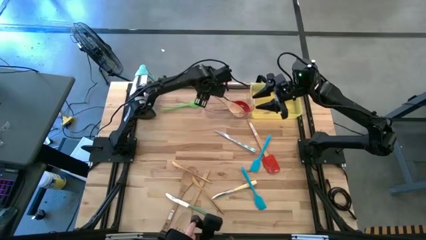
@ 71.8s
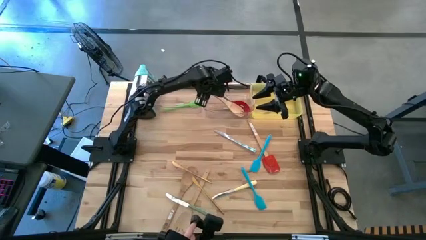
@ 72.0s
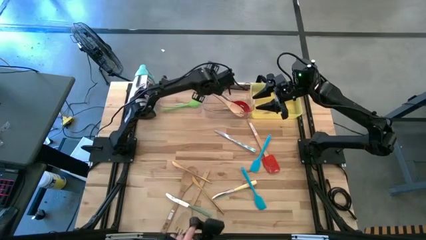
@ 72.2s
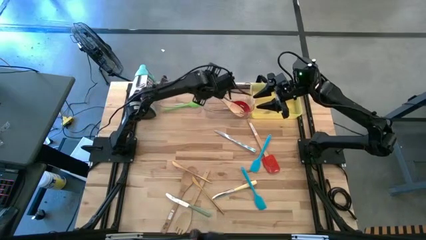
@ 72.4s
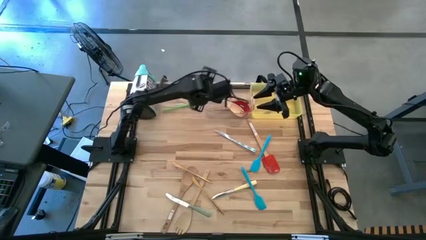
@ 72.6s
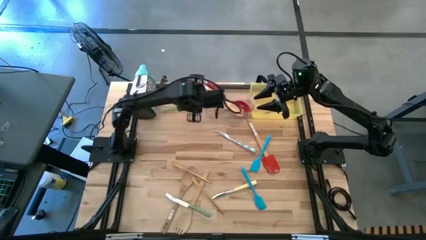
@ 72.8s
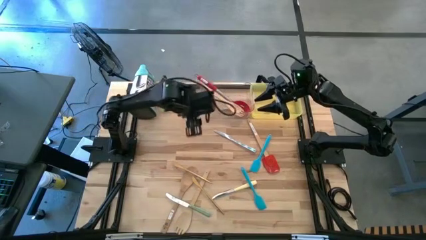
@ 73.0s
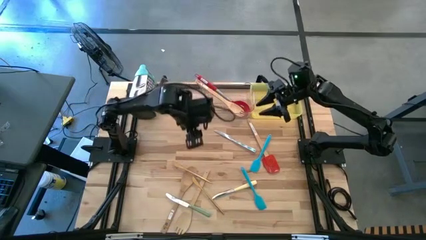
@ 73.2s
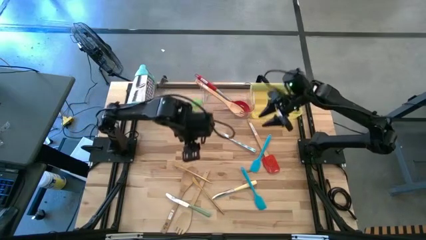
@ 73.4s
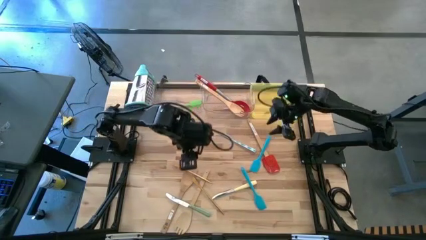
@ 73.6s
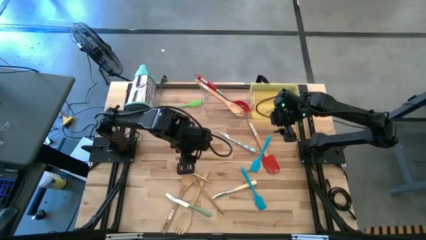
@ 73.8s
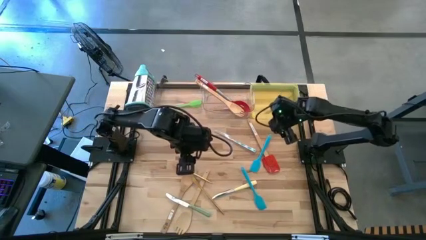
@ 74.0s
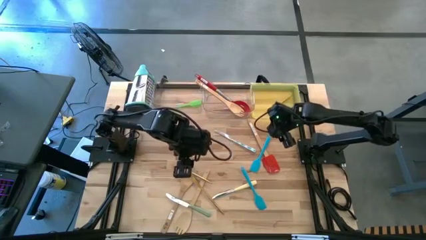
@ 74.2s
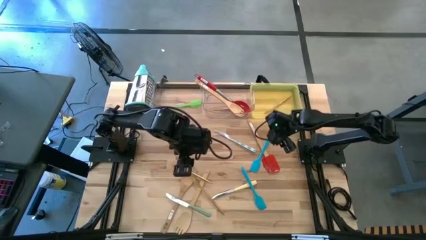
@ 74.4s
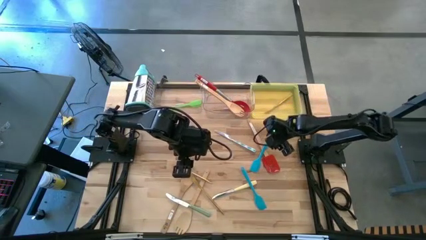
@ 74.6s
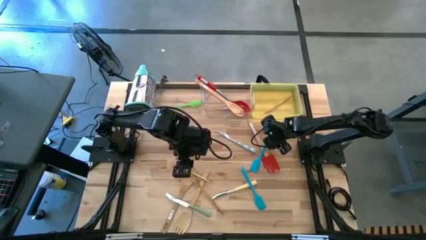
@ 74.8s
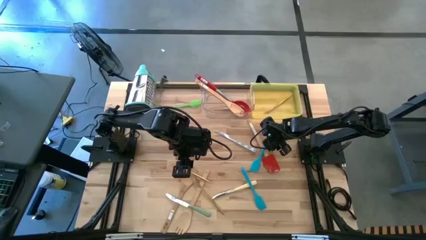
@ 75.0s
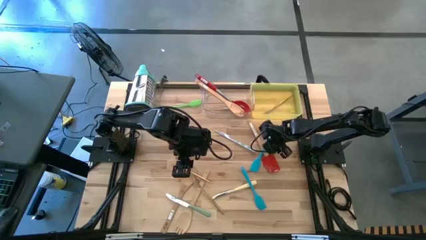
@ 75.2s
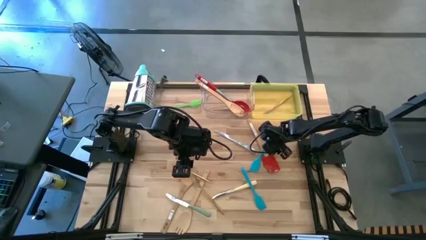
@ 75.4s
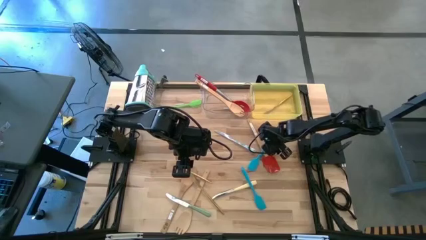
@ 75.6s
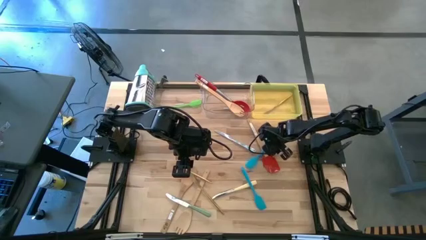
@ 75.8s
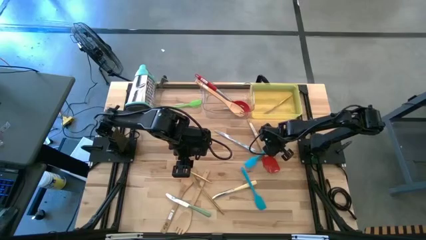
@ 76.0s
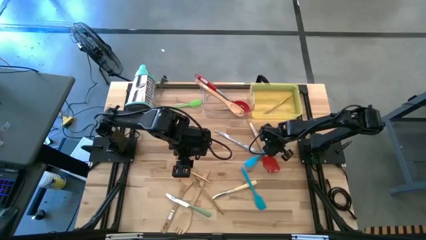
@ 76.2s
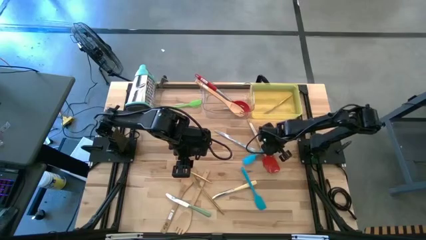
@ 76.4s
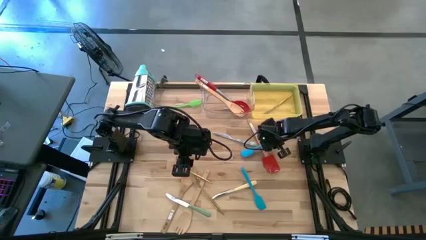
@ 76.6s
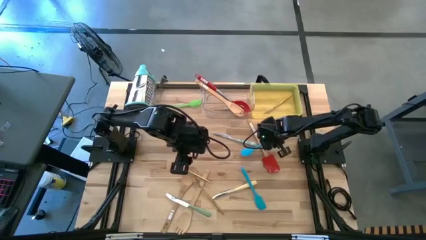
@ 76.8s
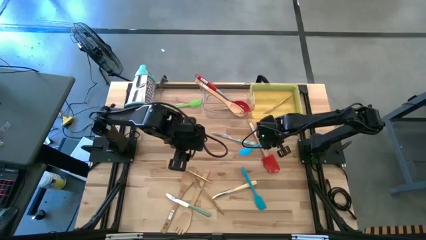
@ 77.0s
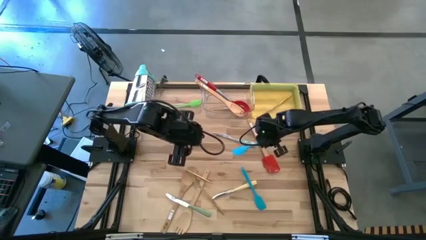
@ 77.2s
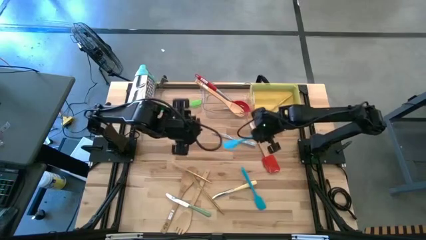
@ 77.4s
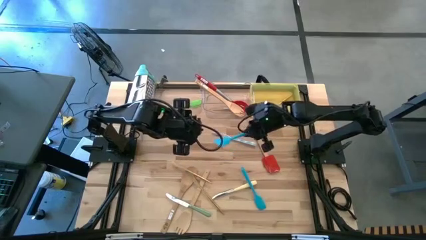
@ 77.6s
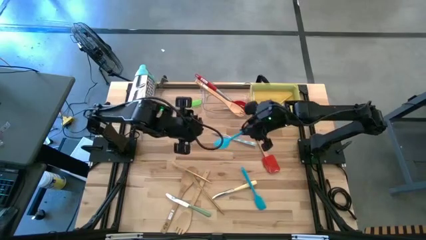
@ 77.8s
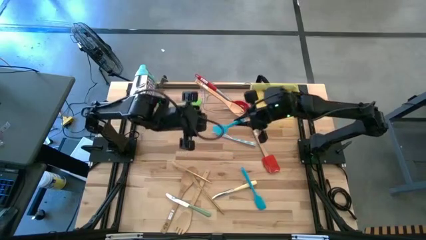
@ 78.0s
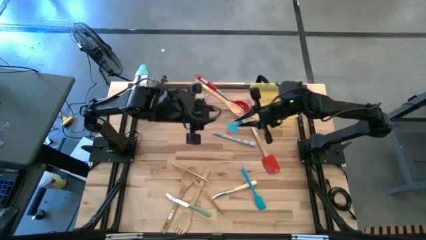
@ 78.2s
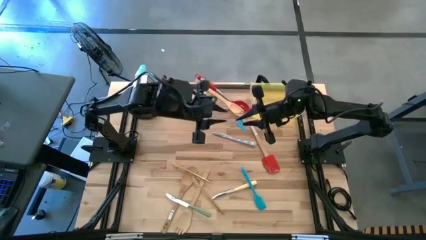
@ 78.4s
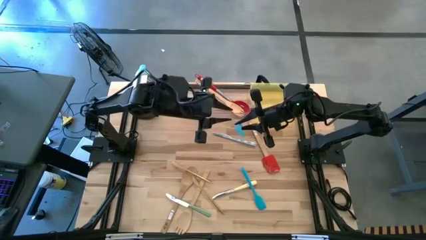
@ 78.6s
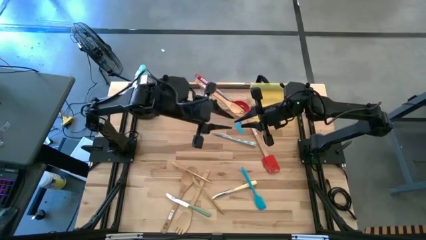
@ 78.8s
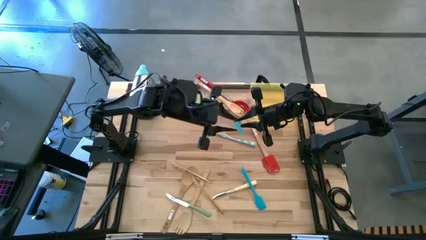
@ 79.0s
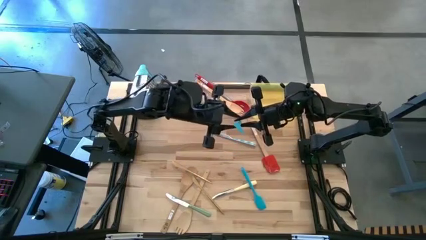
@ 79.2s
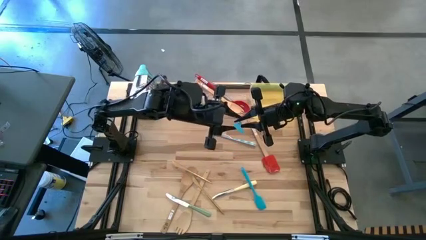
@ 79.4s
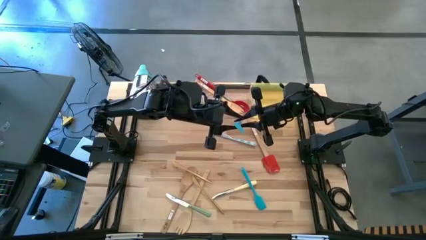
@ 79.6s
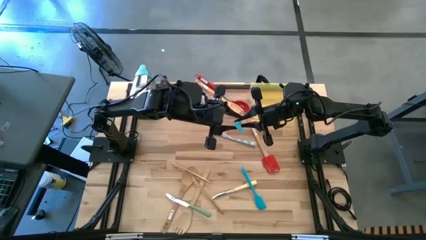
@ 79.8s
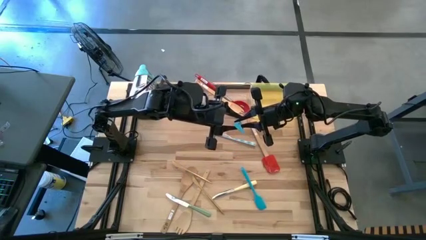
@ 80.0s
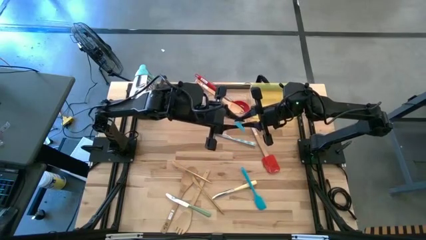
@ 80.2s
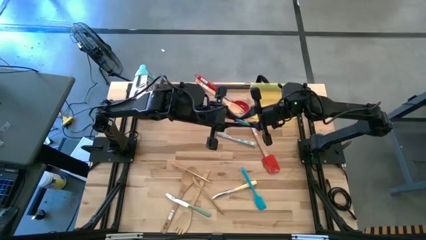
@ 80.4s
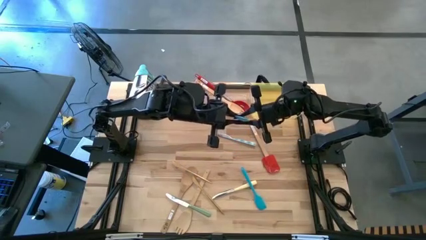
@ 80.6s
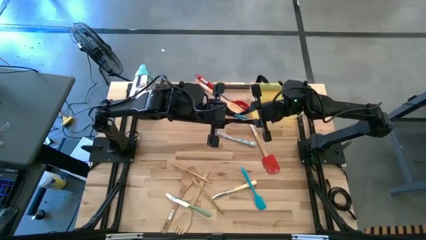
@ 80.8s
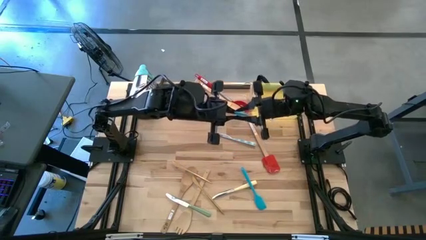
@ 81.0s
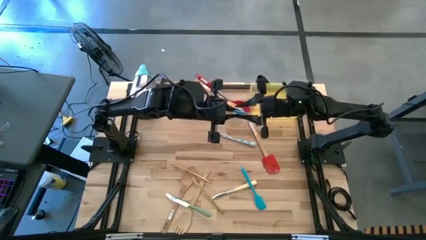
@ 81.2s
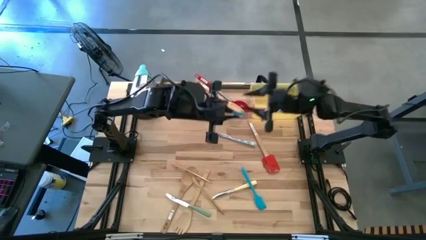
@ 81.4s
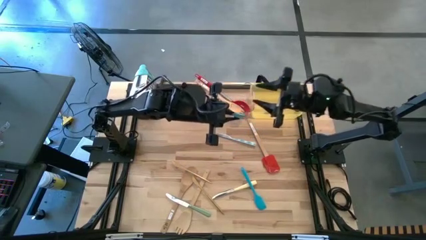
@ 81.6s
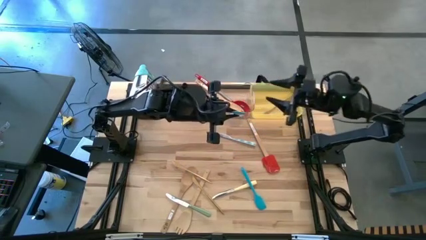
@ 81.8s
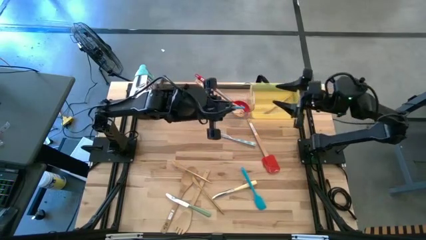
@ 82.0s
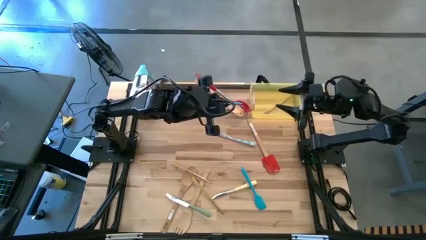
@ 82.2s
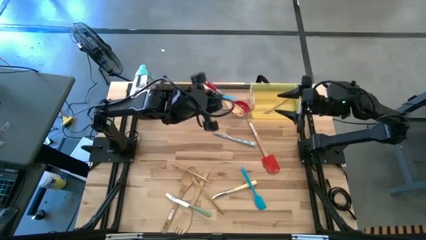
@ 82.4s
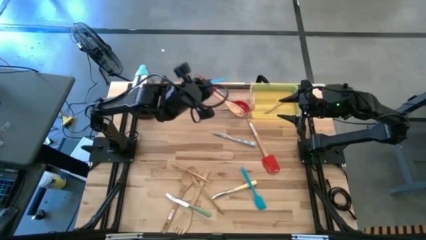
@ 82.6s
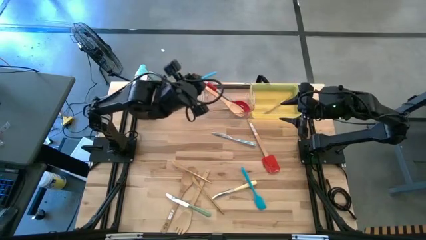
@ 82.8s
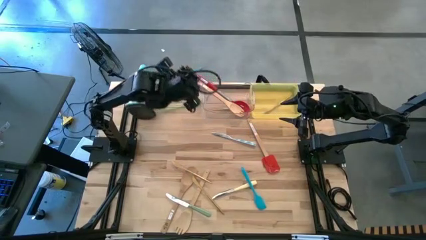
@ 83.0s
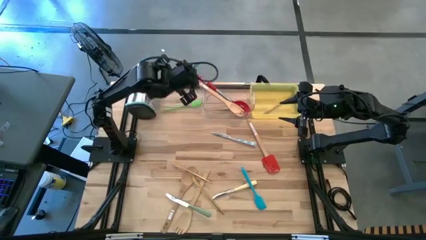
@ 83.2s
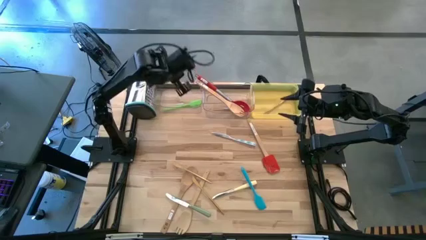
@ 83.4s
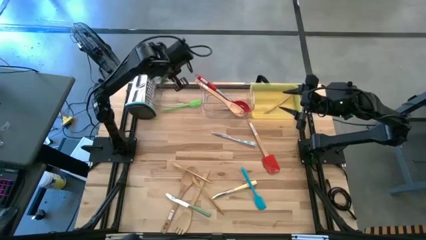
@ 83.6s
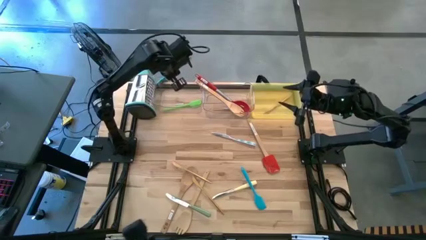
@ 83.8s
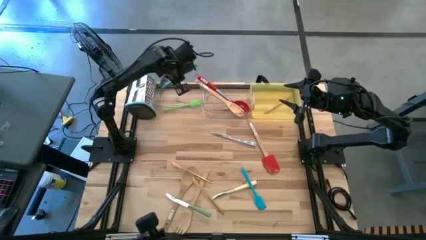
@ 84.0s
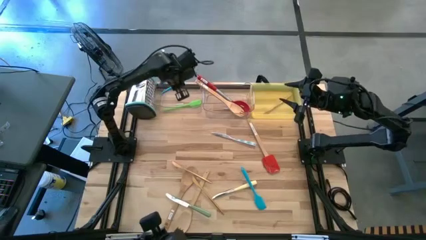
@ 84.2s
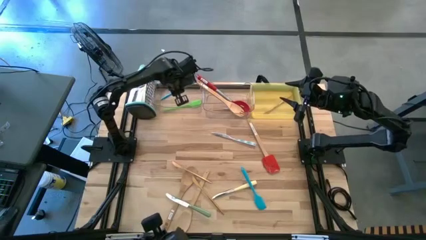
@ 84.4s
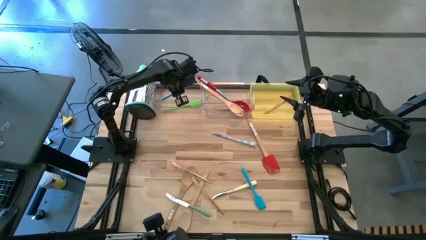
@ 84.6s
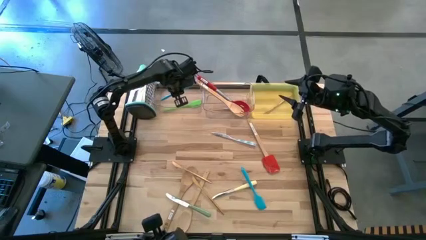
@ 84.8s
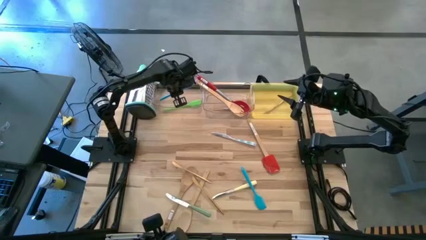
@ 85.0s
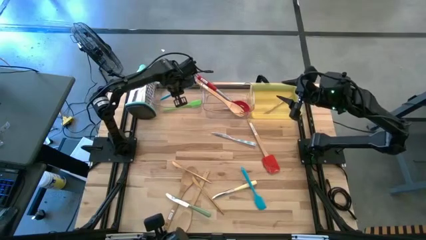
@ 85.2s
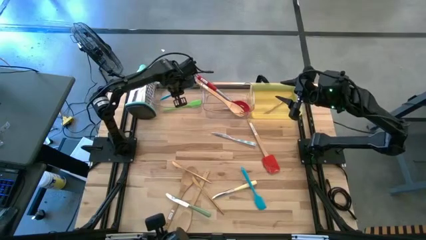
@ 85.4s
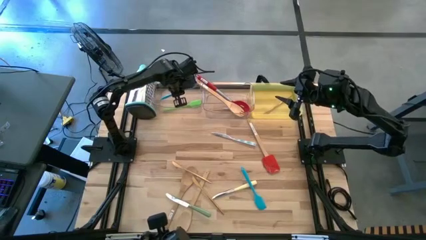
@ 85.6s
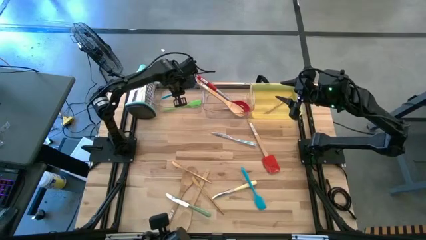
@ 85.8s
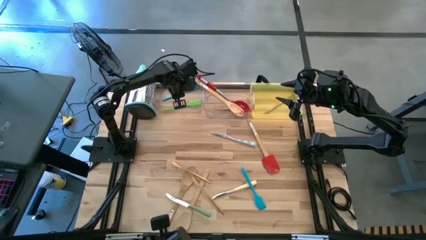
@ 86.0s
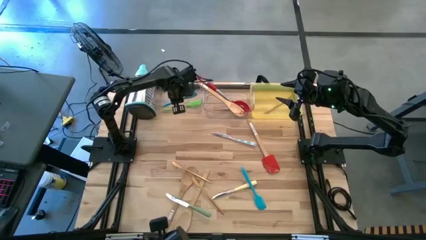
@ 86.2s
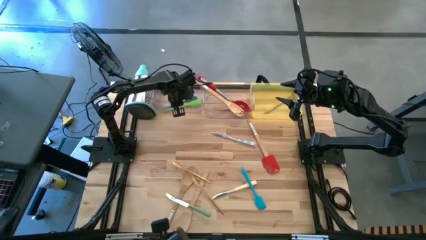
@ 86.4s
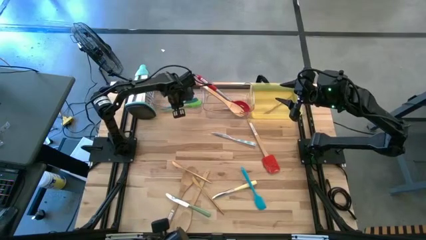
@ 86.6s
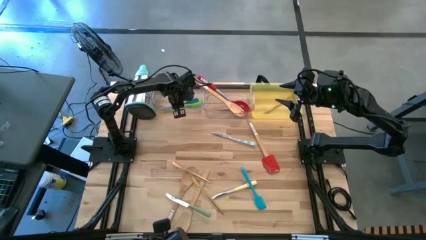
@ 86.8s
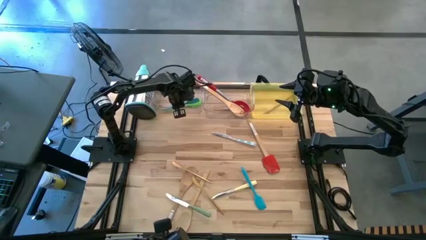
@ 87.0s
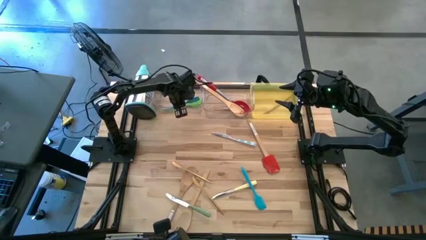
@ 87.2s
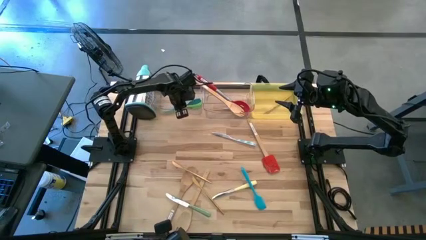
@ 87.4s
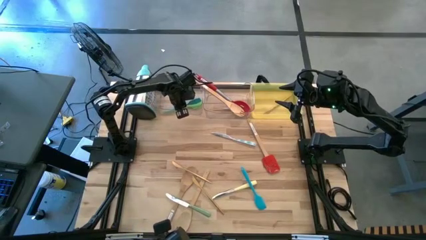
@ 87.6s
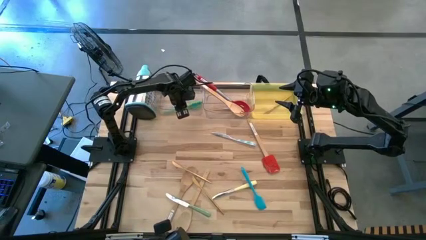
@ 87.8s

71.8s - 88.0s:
Task: Pick & Place Kitchen Items
Put the top blue spatula into the left transparent bin

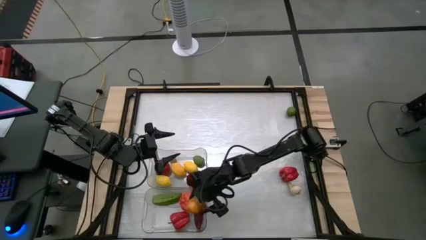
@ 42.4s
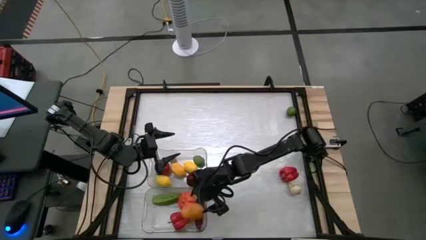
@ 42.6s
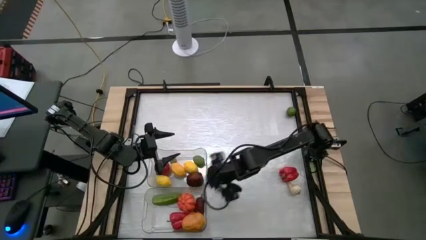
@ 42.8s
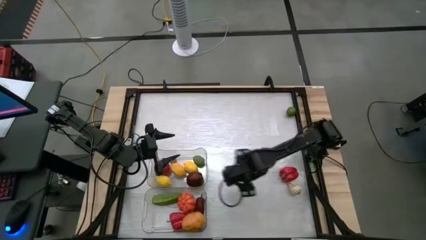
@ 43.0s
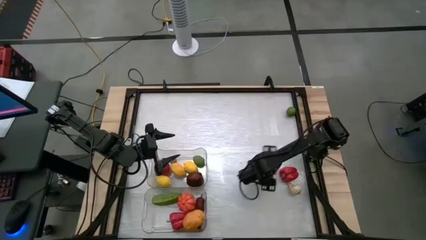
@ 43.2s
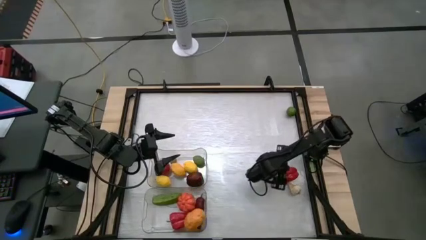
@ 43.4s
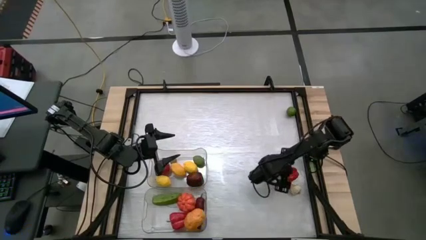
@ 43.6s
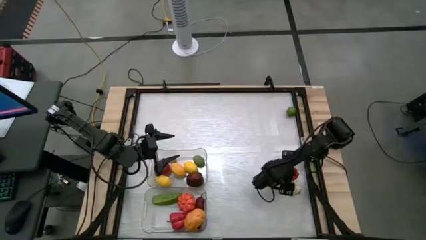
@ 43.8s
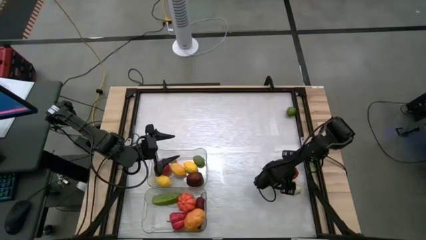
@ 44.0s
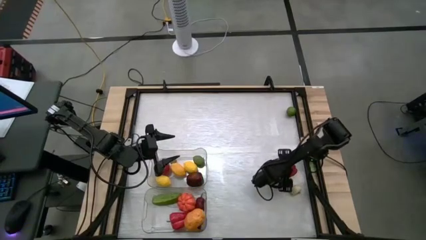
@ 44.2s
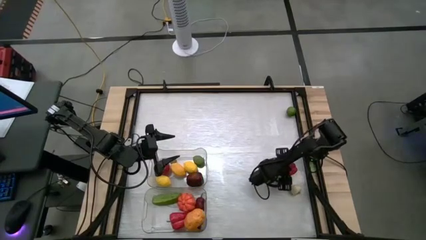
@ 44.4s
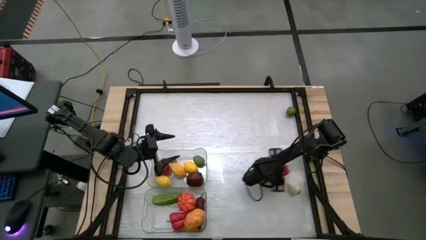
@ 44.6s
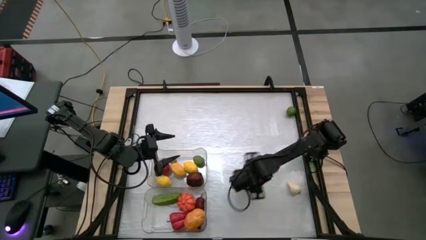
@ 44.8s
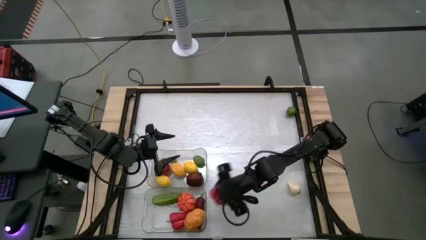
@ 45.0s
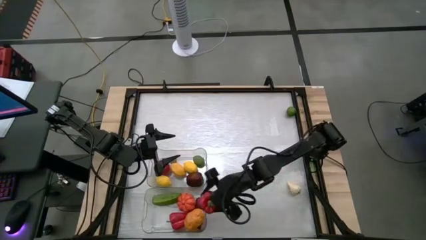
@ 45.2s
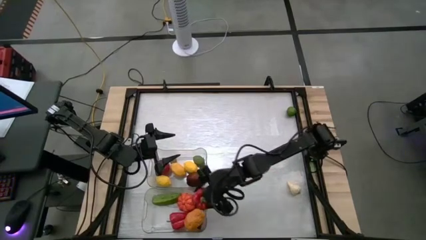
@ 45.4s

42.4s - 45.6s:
Task: Sort produce into baskets
Put the red bell pepper into the bottom transparent bin
